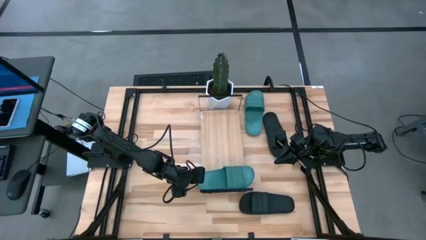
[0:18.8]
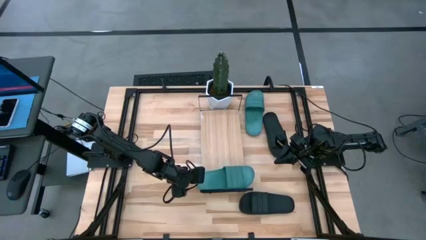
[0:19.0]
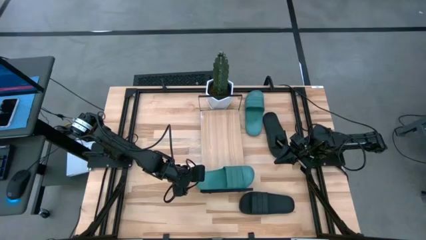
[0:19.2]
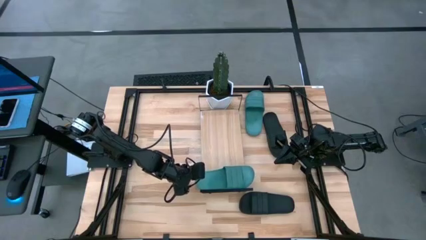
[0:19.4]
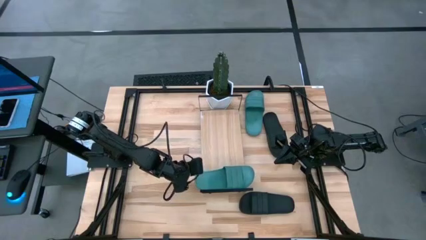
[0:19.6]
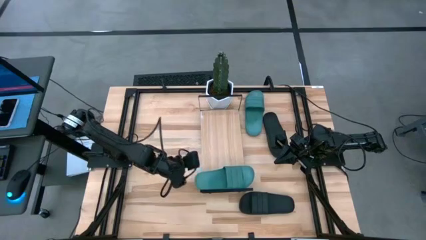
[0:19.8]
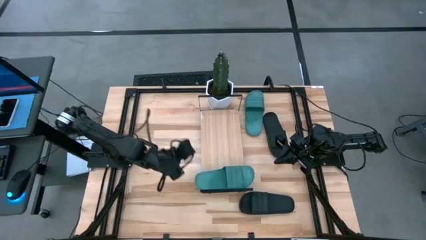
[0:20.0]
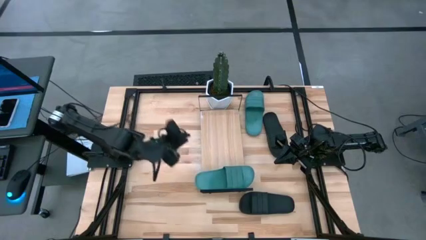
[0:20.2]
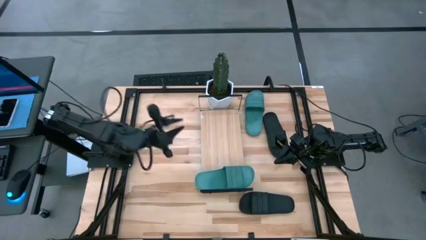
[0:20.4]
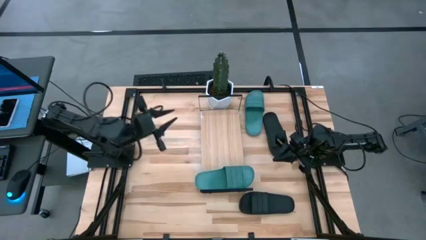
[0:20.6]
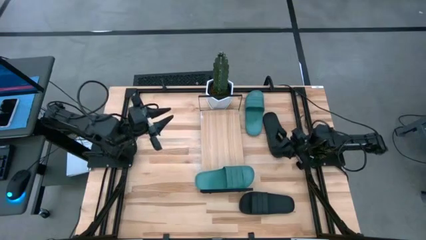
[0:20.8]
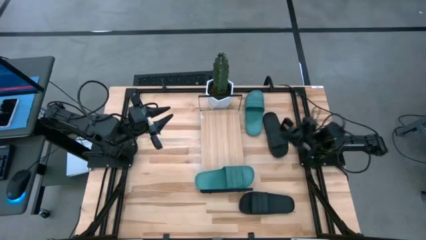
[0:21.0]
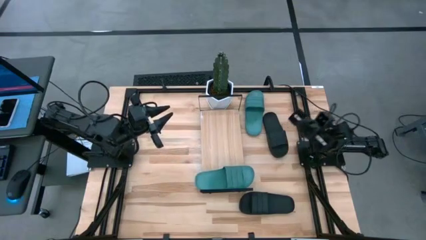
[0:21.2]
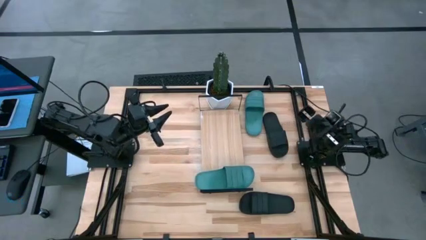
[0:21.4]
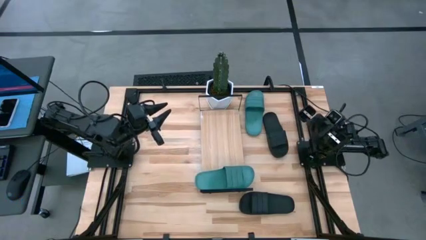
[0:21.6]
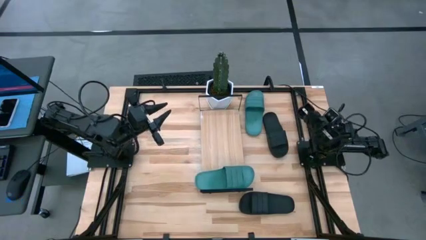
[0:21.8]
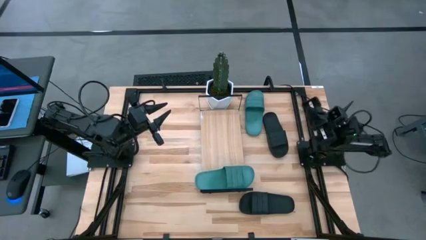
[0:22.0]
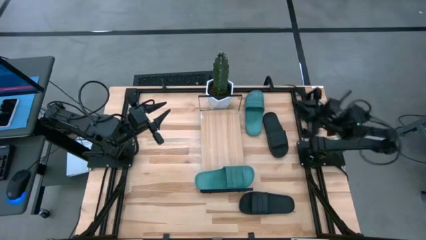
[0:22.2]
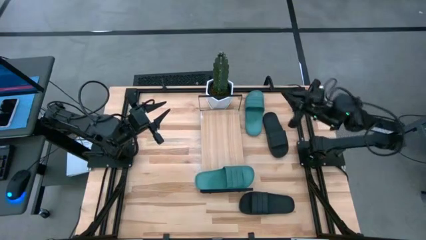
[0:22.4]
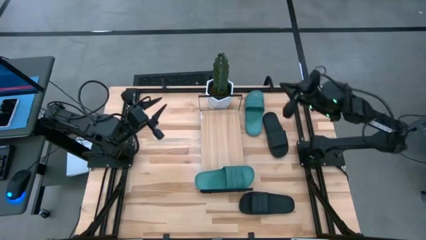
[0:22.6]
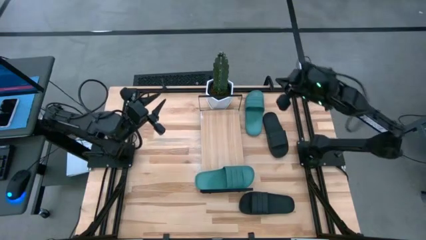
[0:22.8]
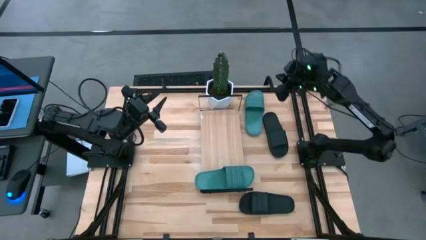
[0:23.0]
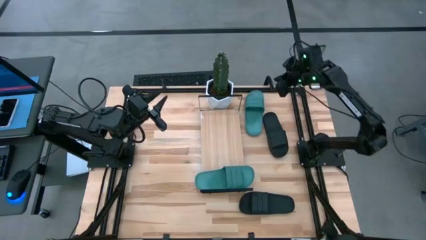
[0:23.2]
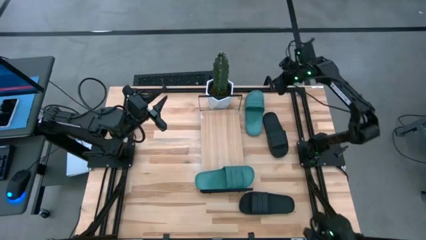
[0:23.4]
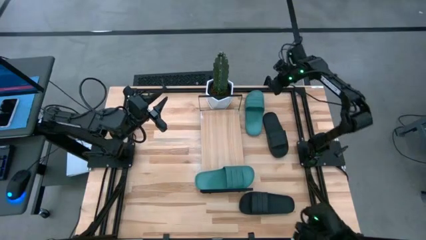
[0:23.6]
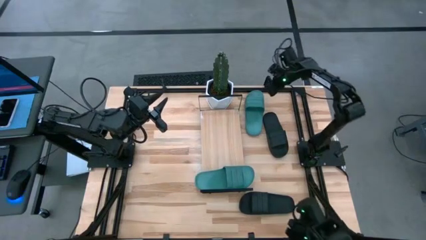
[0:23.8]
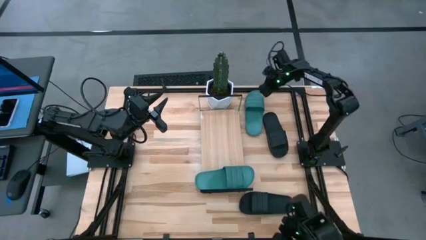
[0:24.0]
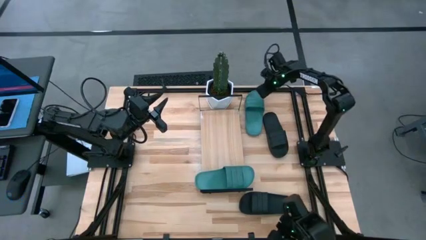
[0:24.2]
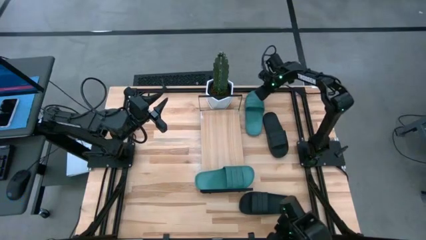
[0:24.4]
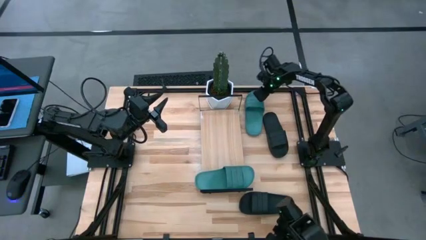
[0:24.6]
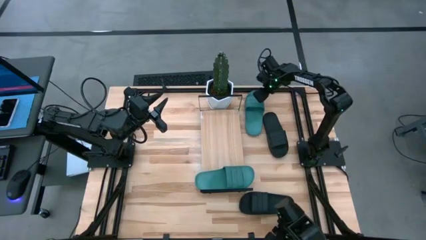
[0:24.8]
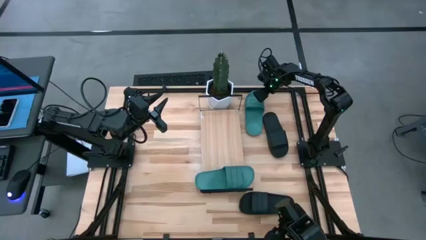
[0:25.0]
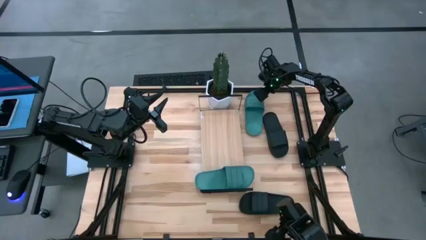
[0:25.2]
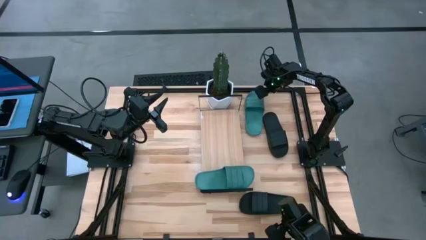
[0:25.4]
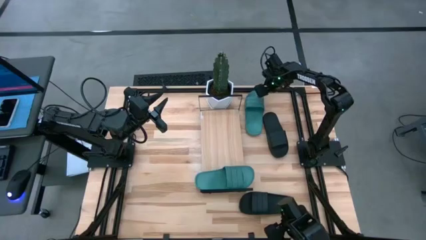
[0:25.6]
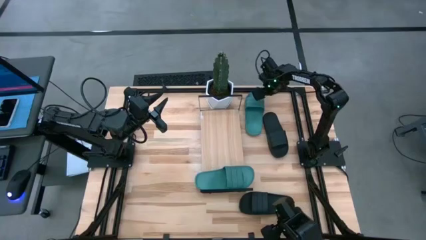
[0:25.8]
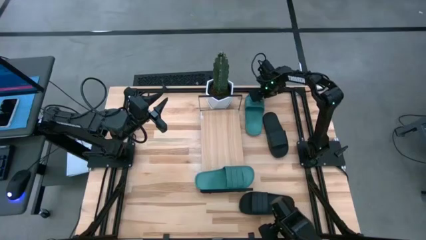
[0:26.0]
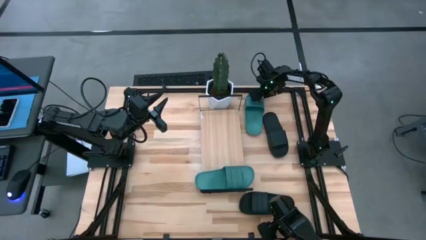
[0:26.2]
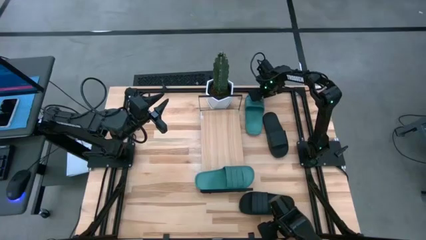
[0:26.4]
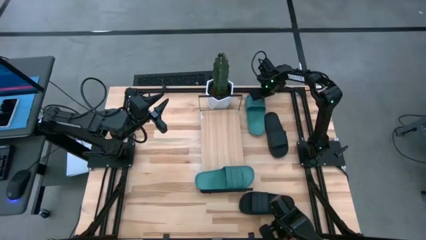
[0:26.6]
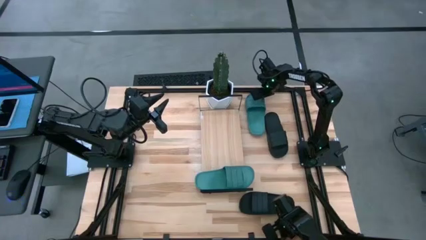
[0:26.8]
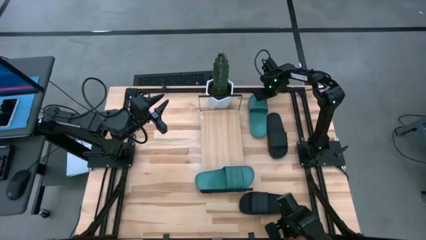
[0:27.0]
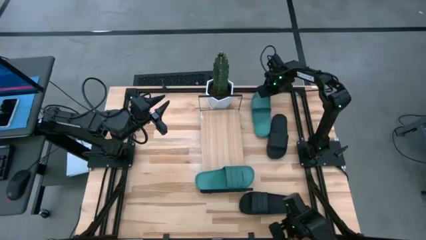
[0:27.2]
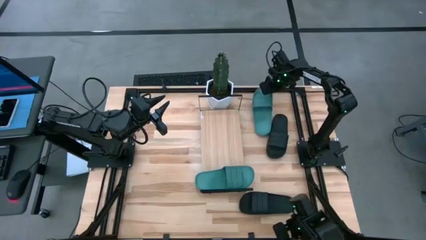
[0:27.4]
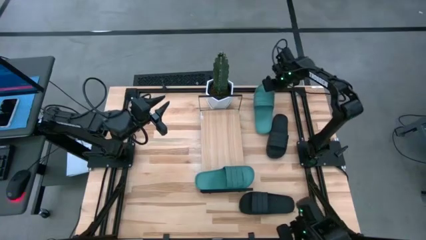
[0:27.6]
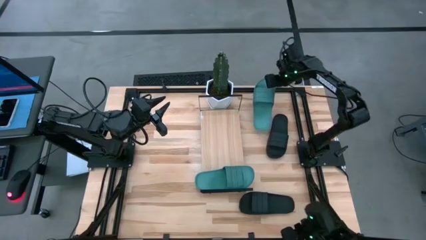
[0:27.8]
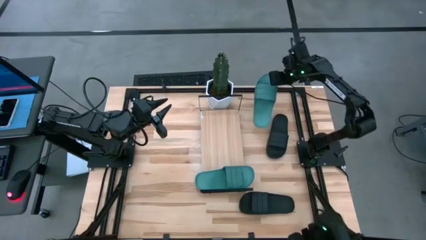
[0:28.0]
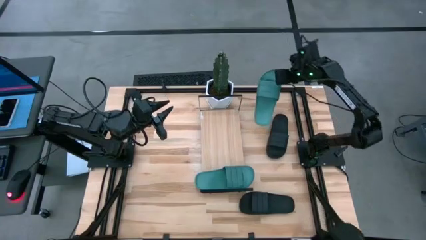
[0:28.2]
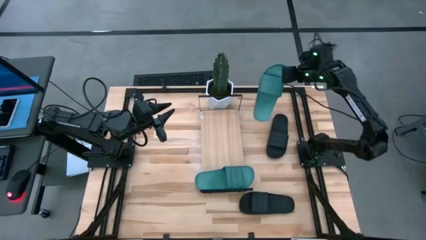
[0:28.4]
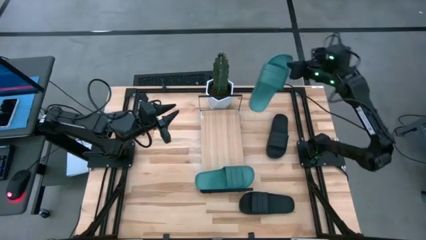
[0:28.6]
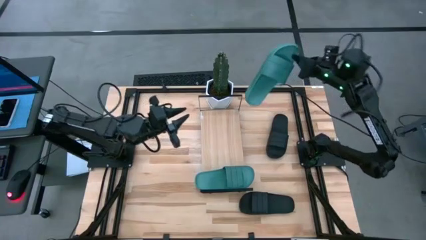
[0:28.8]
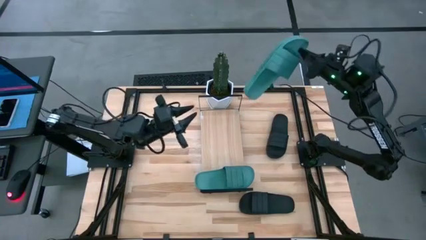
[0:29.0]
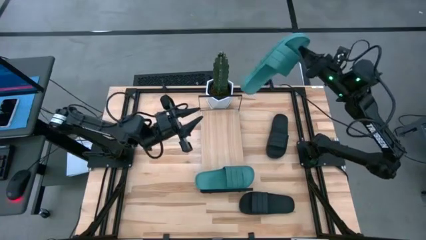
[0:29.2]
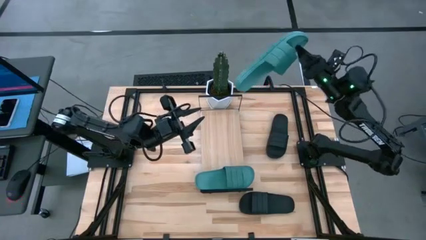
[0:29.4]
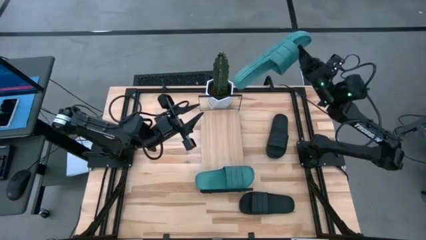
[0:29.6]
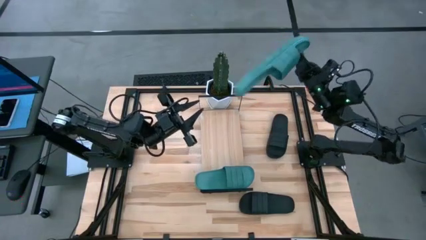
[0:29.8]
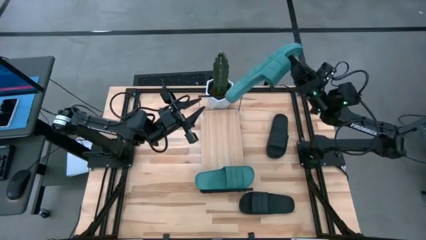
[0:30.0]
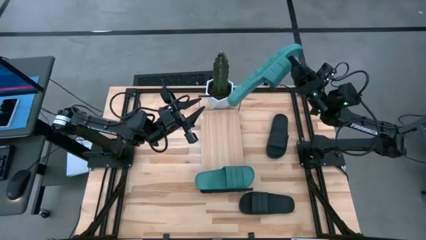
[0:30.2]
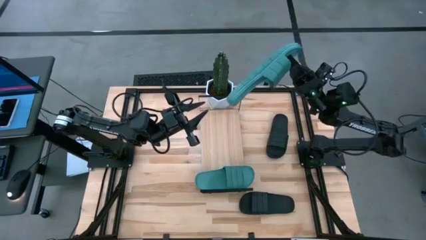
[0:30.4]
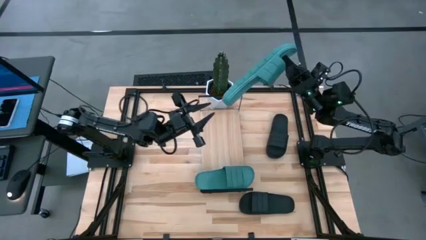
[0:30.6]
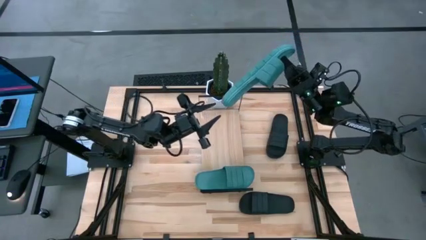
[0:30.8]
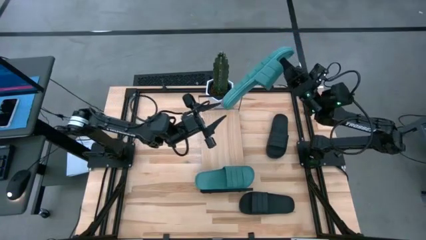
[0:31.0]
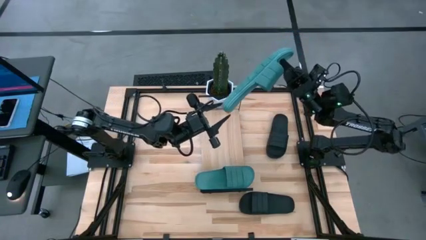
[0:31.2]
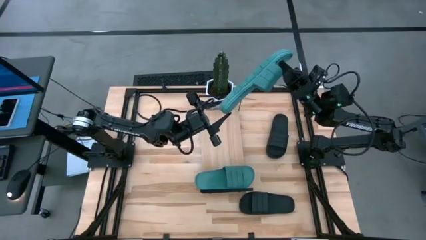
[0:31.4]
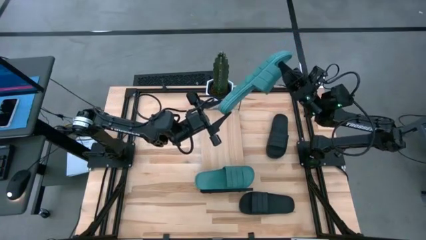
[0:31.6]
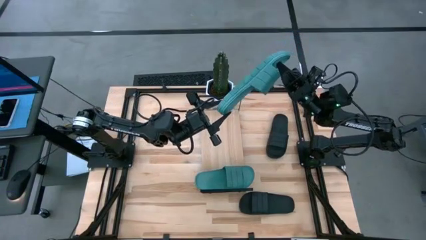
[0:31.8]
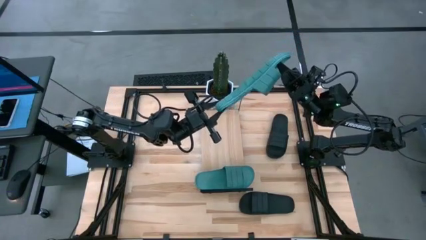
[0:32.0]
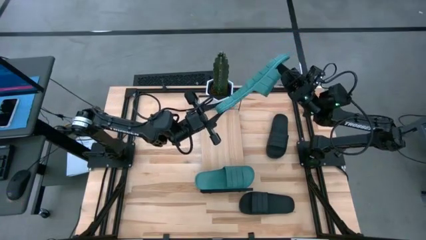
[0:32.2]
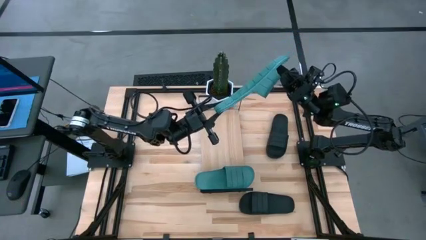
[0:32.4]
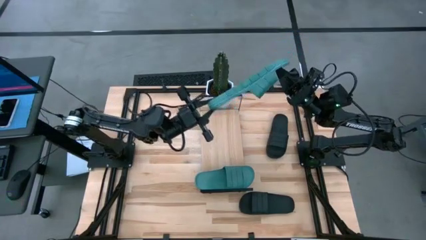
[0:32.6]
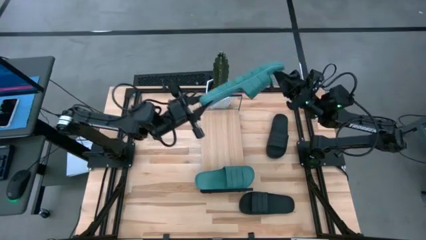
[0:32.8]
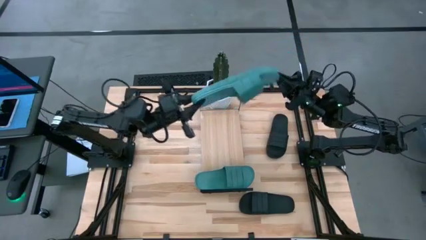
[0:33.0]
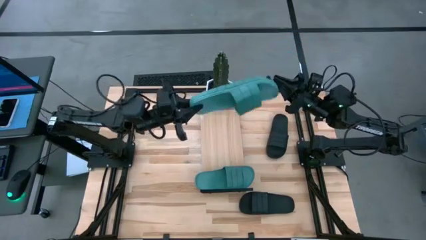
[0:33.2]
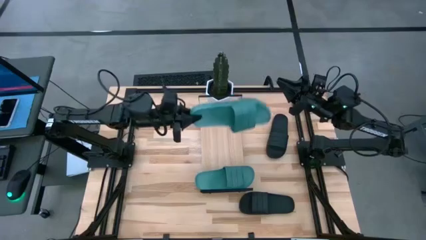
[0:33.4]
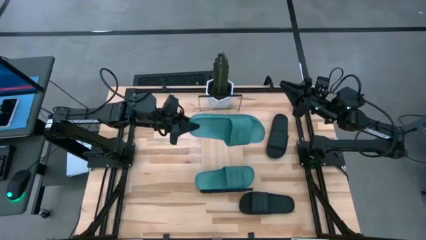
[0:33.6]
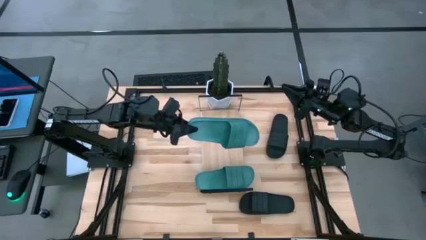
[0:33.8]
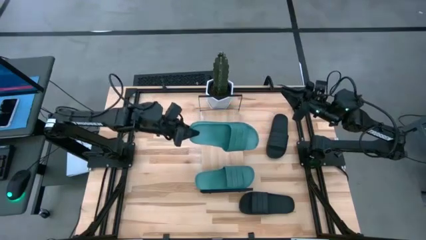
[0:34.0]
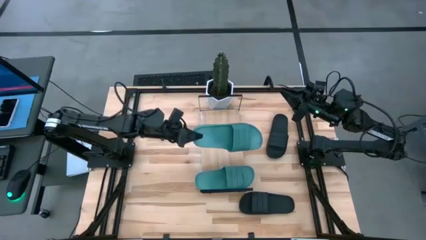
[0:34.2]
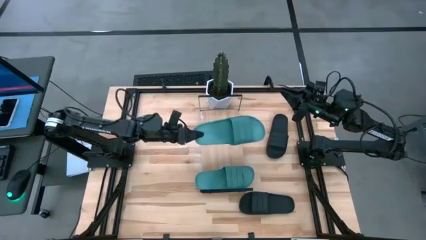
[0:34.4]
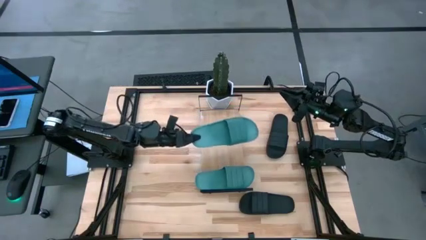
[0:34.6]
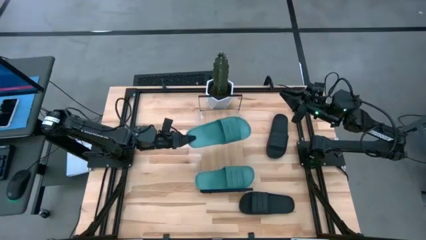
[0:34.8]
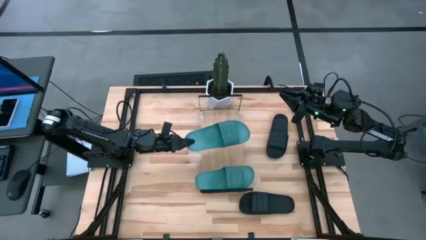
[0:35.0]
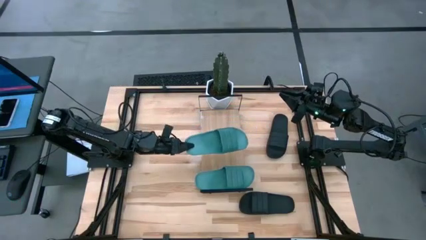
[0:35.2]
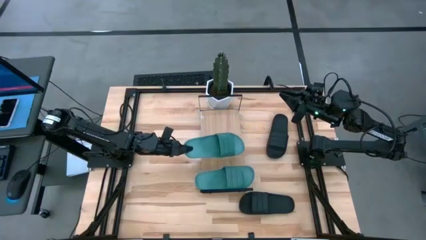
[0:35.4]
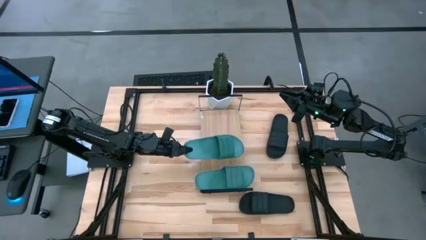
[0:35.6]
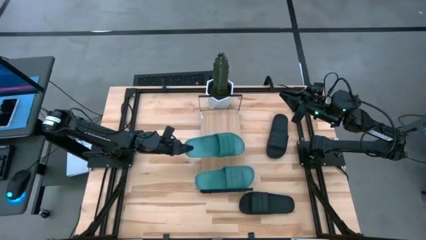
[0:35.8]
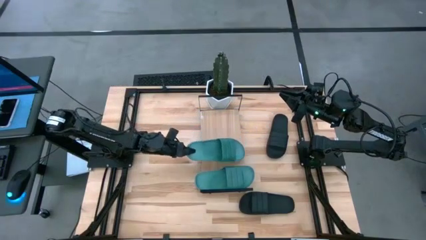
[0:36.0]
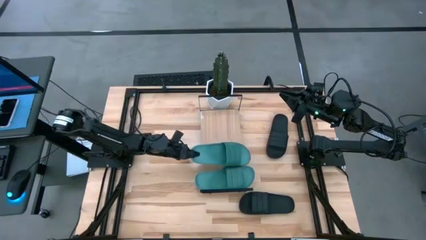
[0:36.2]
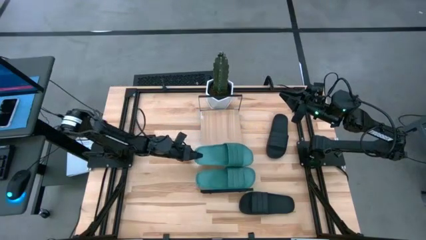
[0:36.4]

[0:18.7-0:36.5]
Task: Pick and place slides into the shelf
Put the green slipper on the shelf
